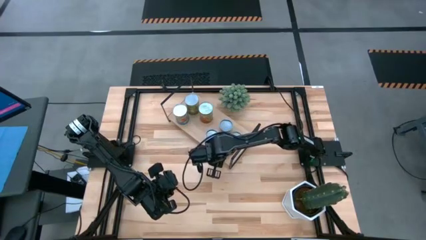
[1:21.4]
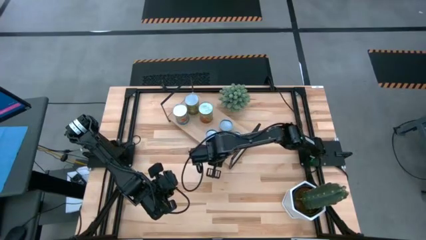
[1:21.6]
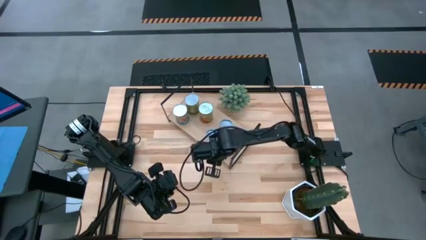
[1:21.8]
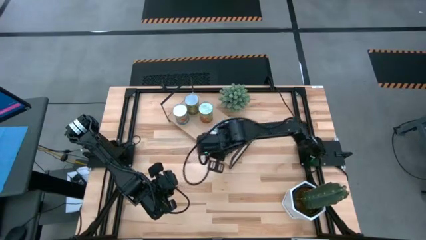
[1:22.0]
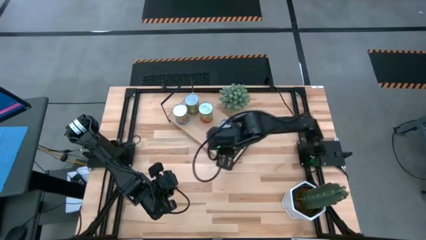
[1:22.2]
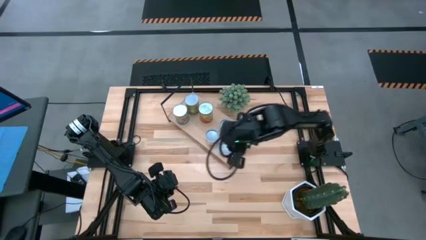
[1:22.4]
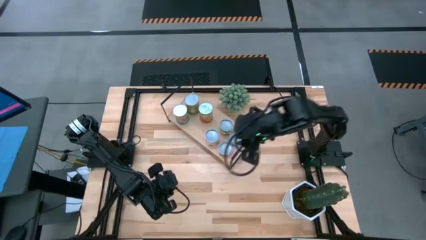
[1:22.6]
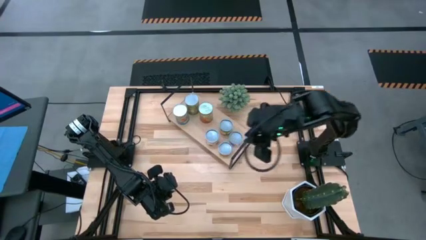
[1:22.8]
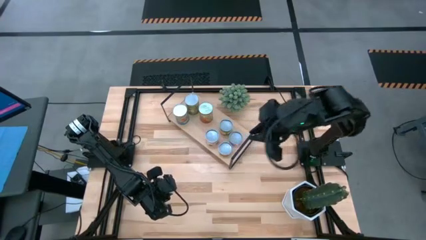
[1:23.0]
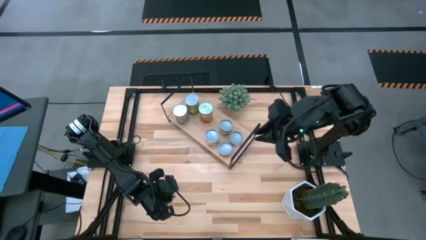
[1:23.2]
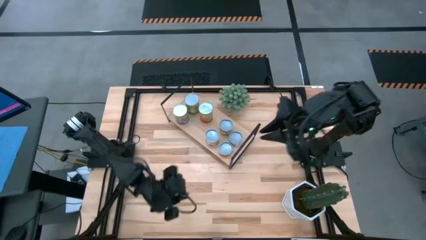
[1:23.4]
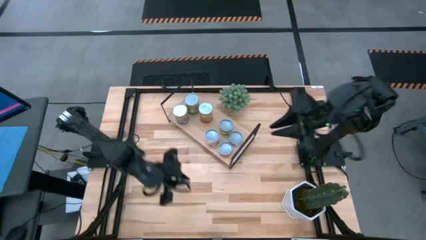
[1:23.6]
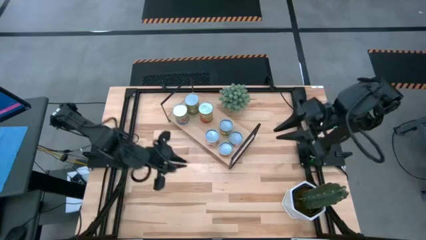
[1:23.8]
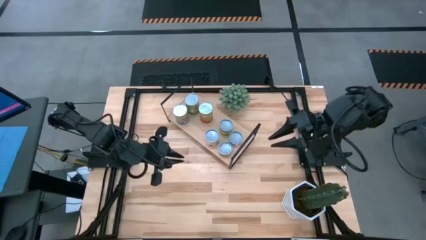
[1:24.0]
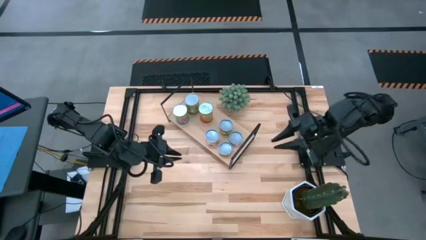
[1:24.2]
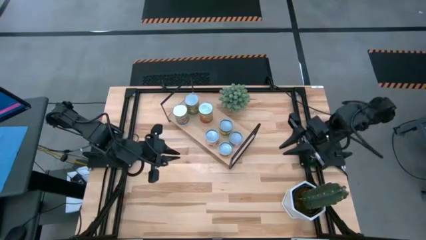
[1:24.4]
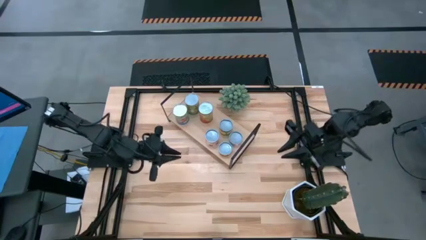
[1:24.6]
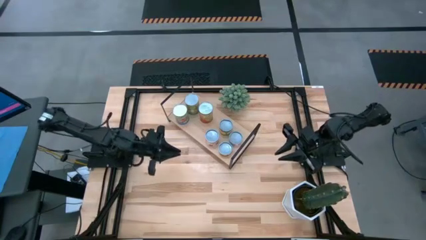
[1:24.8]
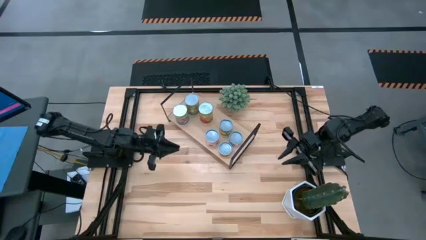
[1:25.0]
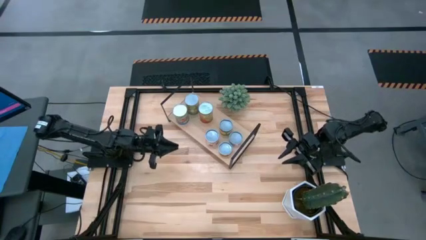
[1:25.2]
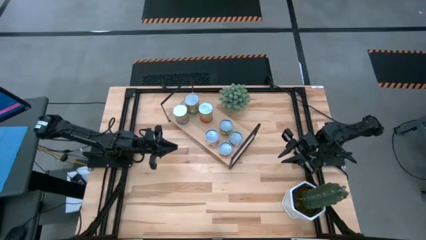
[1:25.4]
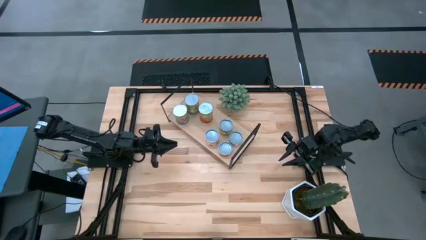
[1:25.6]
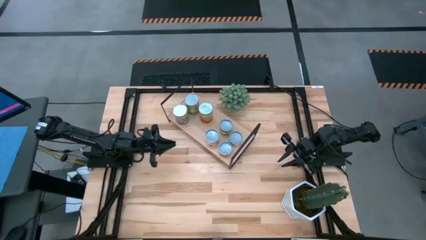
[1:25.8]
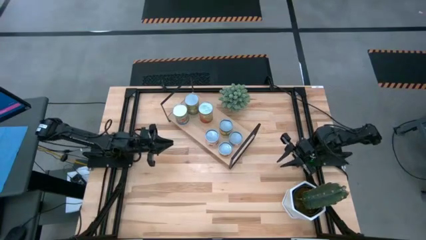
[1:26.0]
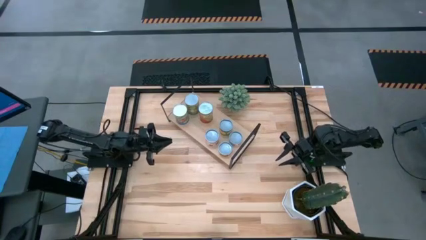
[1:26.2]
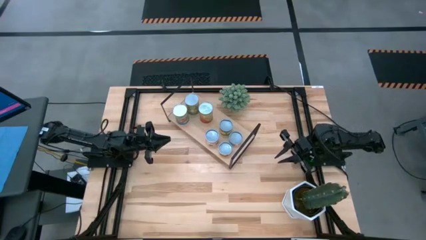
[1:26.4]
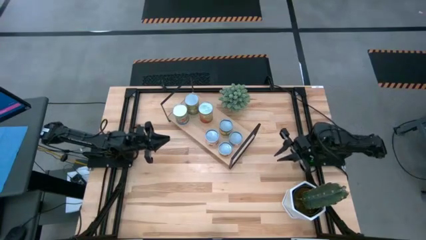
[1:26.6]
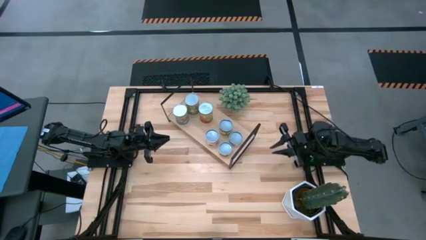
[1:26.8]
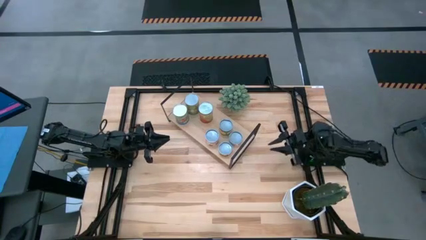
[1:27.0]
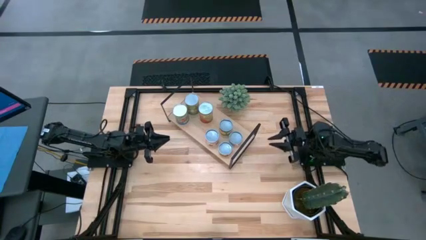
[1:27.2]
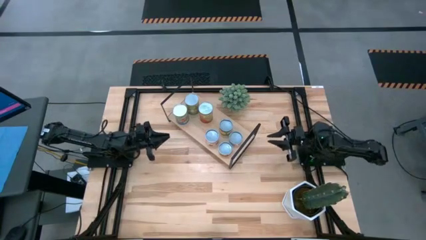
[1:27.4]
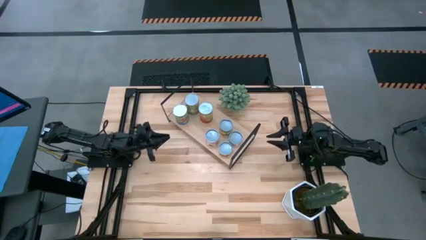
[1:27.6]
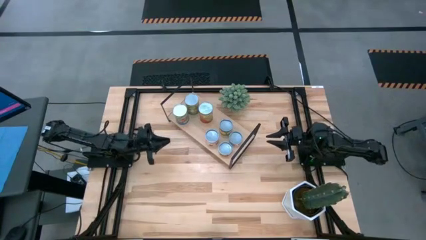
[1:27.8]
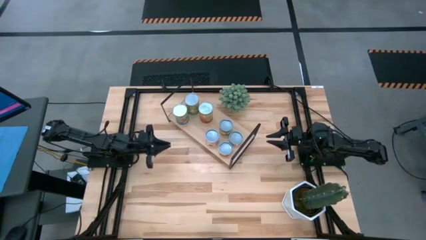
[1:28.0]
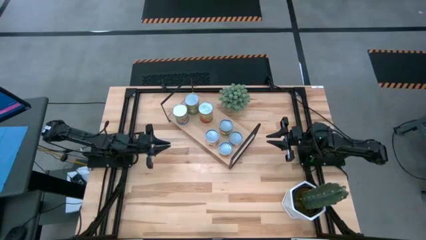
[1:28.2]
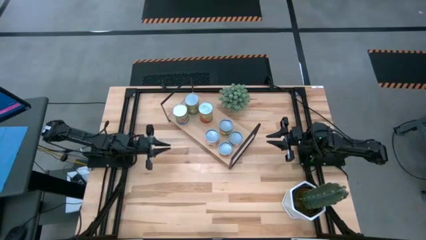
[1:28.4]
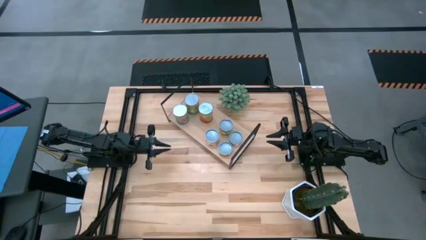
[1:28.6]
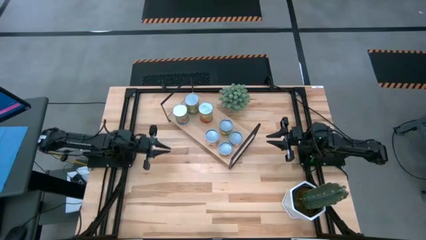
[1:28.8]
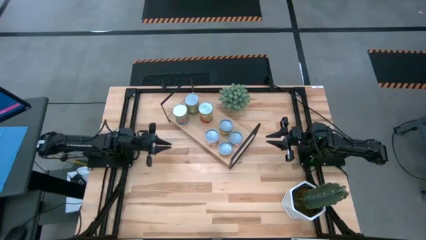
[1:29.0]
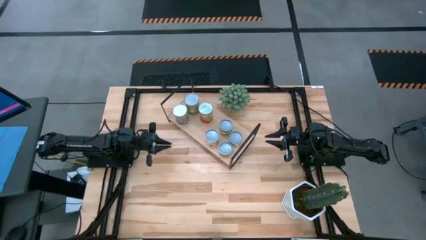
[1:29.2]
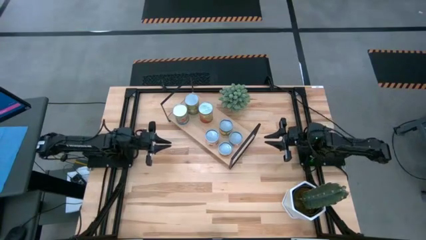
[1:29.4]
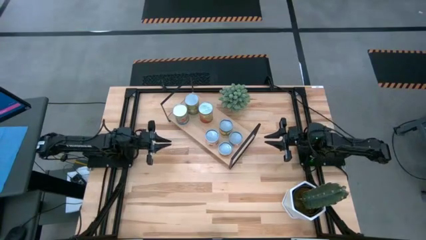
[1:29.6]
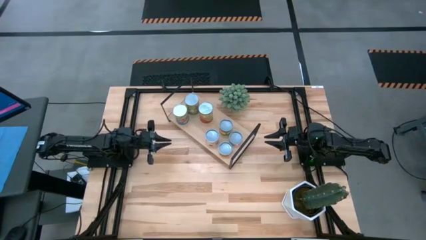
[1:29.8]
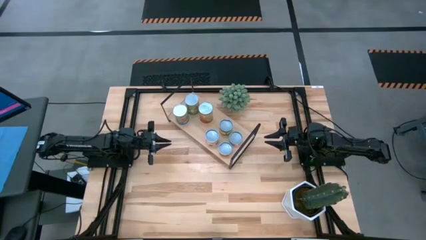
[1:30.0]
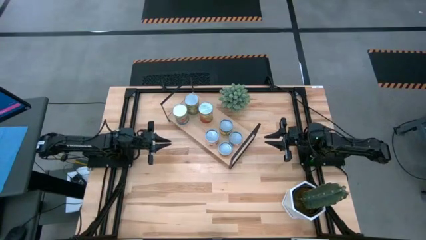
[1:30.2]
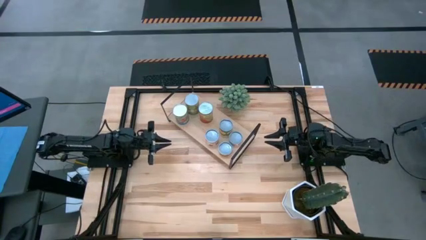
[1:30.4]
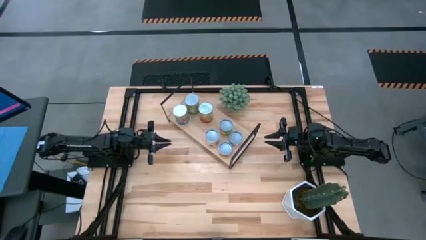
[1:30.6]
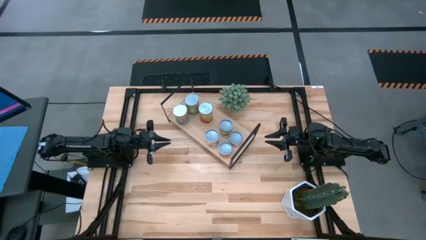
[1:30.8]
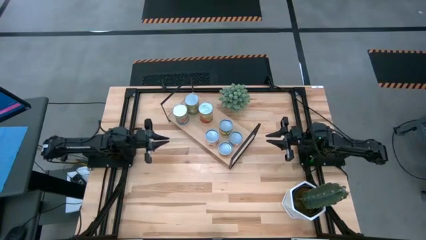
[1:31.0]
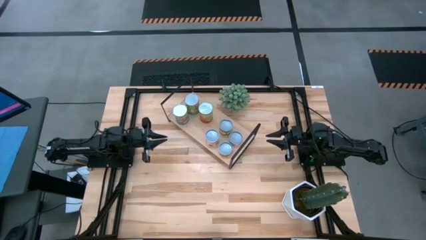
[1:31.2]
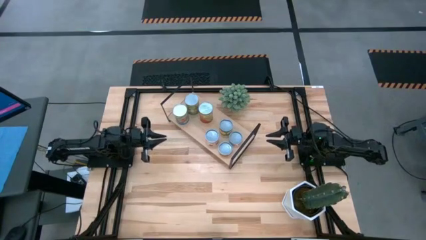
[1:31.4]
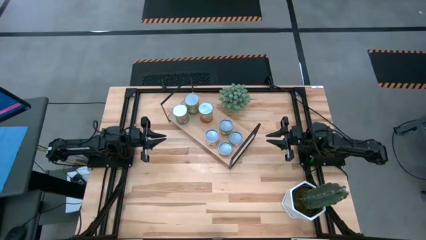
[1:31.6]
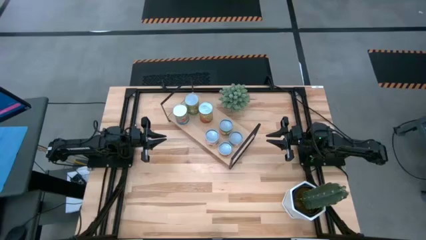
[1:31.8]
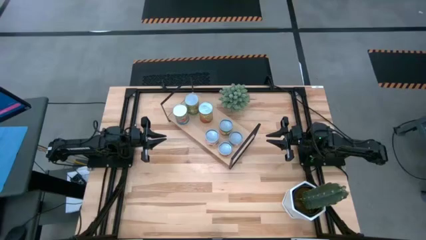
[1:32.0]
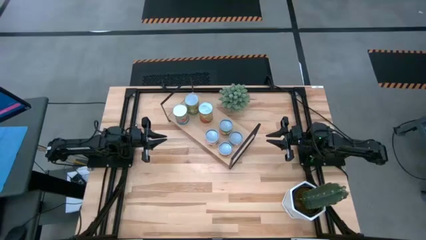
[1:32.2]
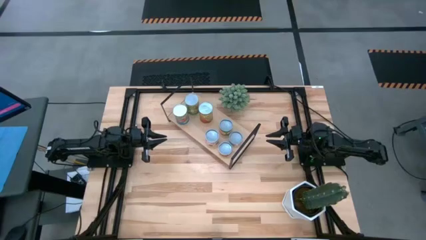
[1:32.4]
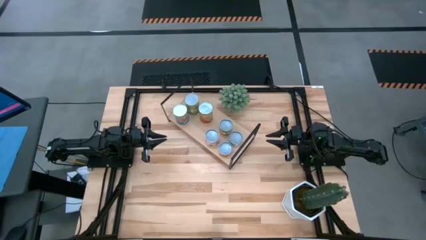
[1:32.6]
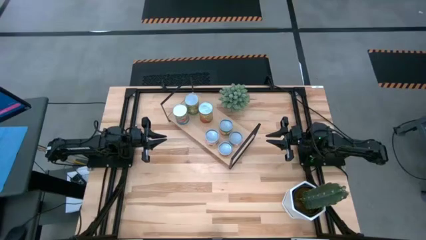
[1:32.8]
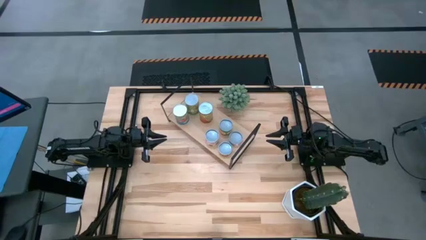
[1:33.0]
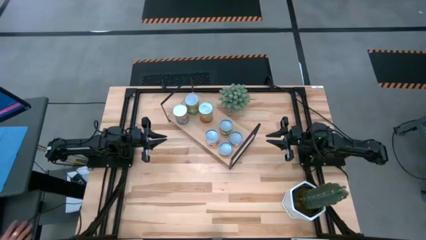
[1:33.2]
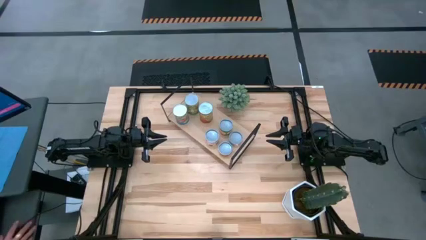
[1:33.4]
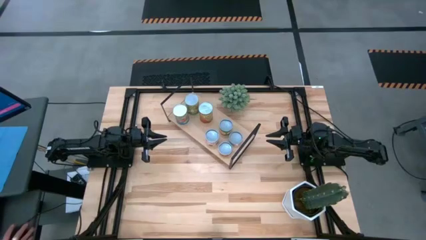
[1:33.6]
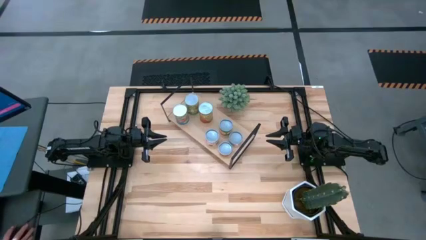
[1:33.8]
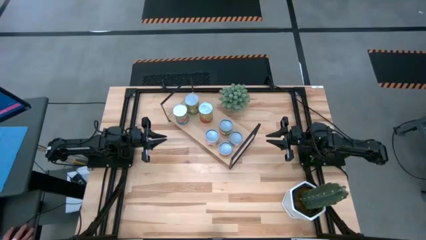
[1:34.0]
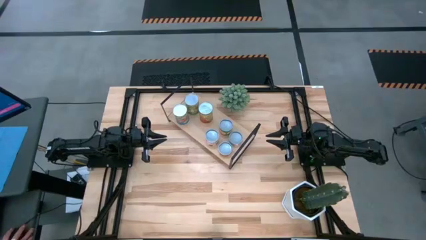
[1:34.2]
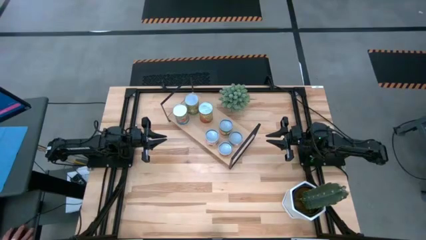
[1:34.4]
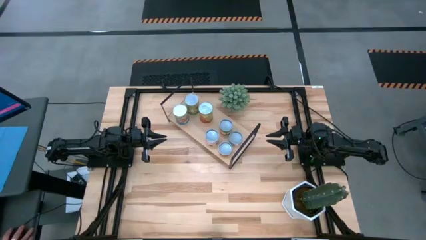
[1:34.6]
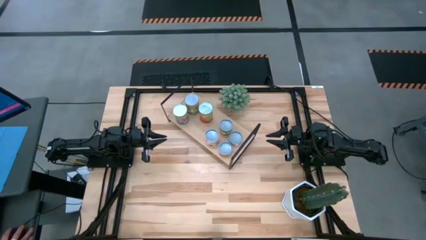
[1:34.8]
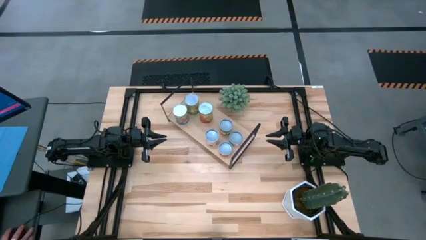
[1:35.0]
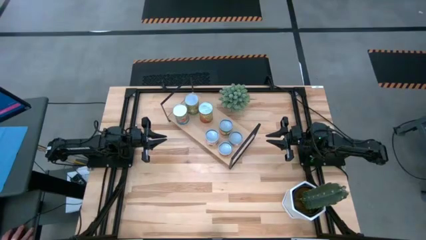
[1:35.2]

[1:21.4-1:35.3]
Task: Pick and place cans onto a shelf
Return to Home Position
